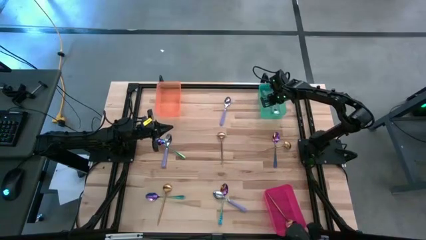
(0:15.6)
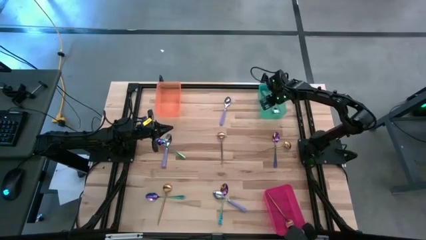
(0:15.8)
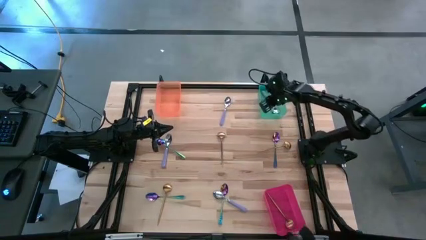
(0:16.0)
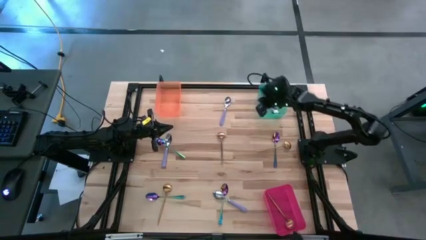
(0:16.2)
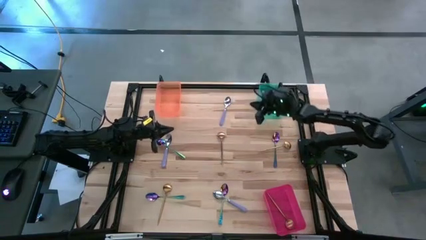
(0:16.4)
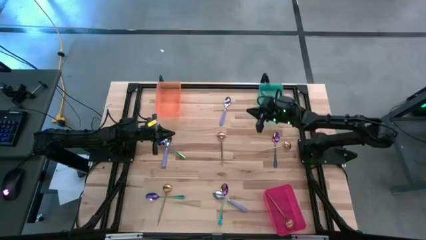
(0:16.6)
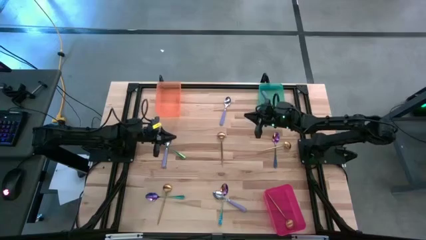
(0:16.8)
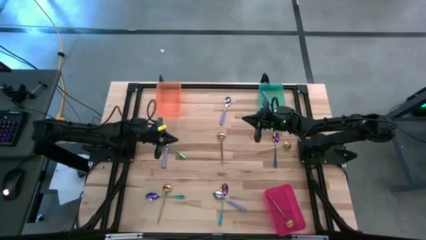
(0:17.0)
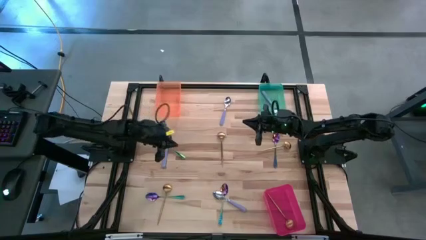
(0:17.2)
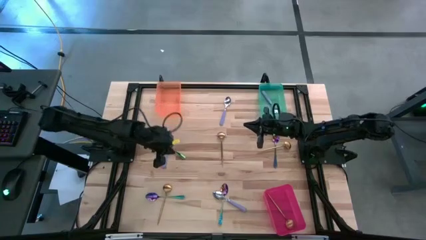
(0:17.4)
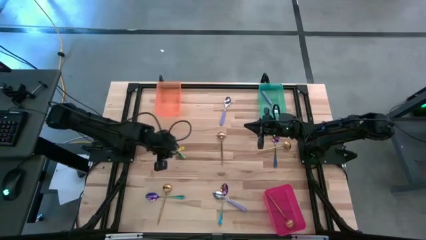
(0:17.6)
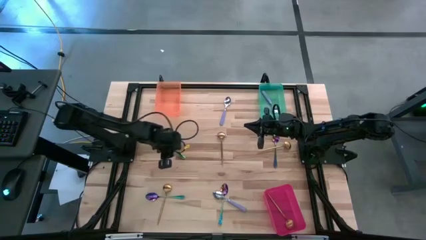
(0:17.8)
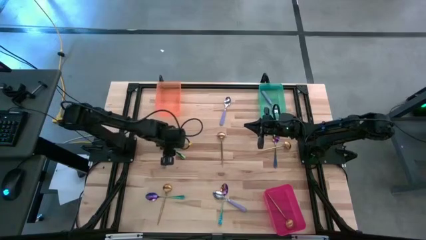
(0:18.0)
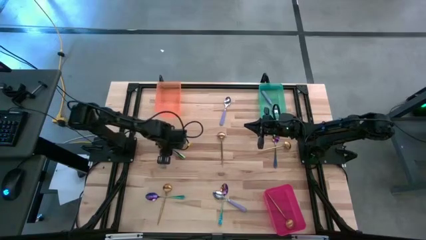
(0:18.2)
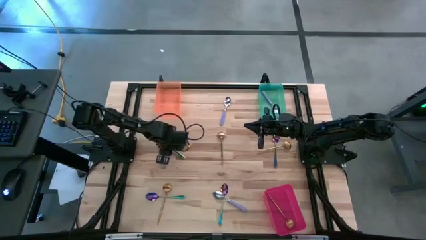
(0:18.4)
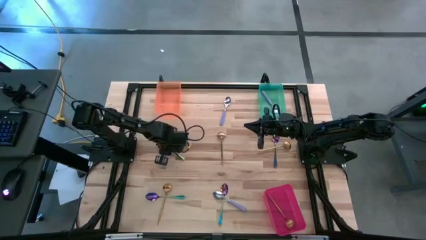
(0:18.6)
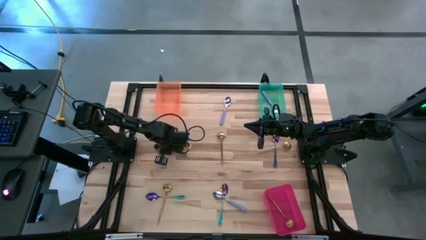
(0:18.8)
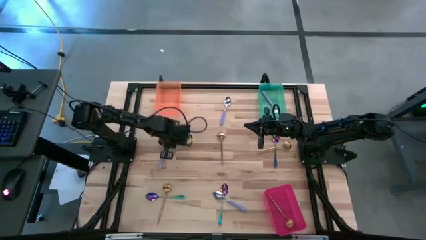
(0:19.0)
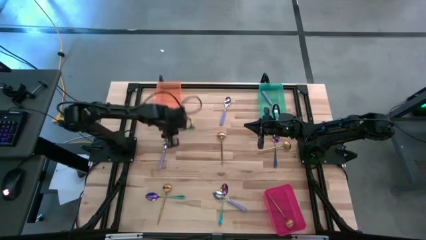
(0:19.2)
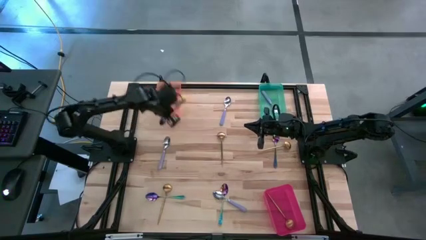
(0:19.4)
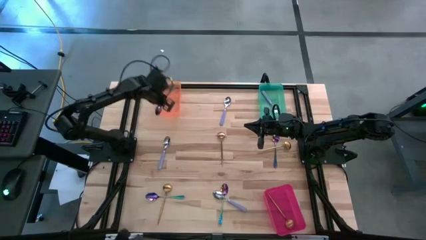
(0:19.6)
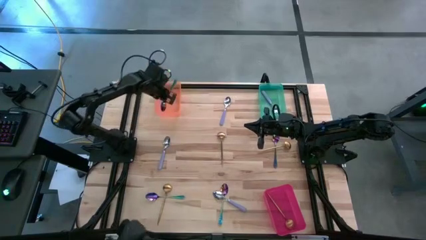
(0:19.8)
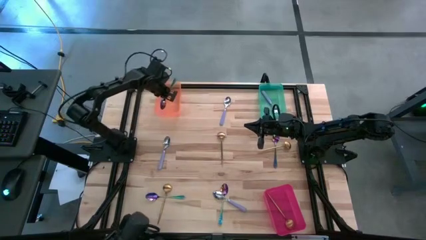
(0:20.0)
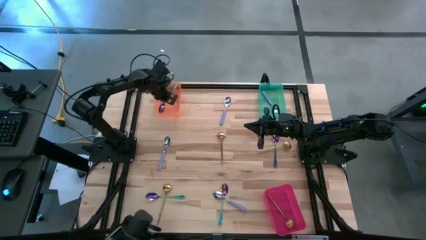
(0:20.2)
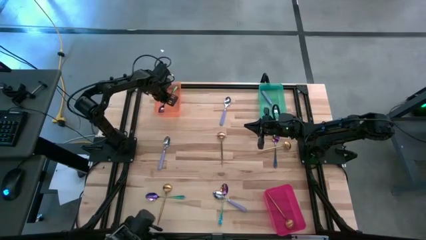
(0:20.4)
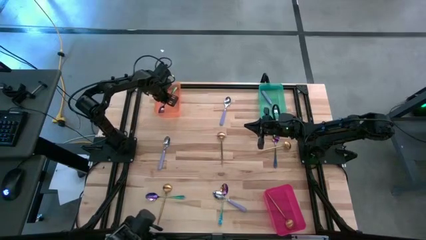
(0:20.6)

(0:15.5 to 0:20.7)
Task: Sort silverware by color (type)
Put the blue spoon into the orange bin

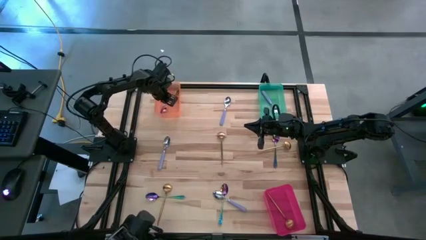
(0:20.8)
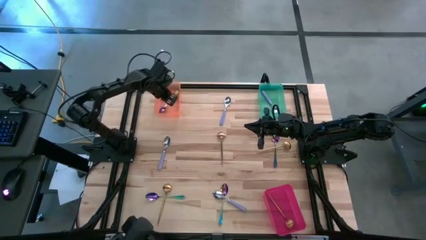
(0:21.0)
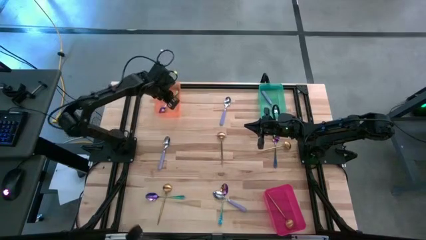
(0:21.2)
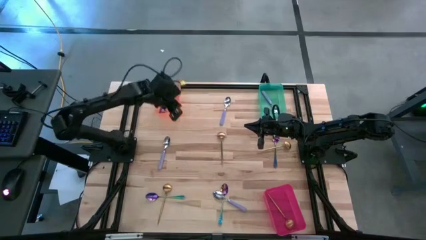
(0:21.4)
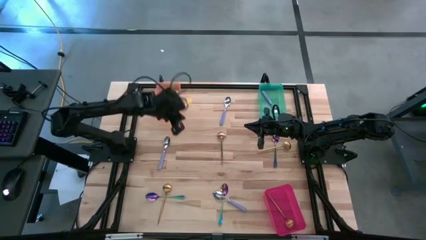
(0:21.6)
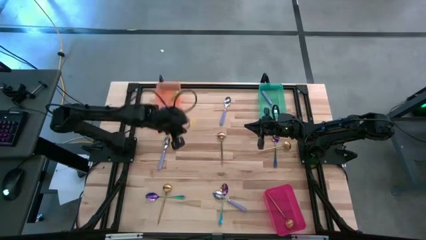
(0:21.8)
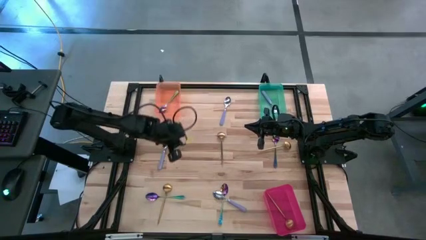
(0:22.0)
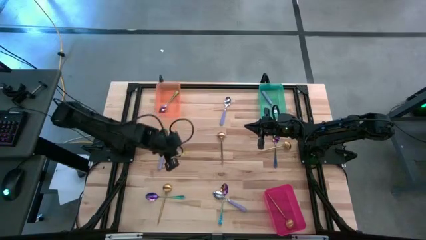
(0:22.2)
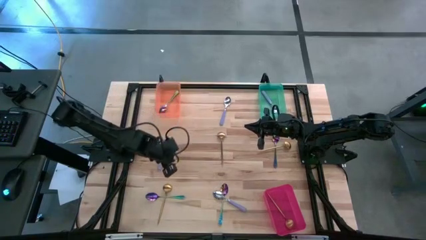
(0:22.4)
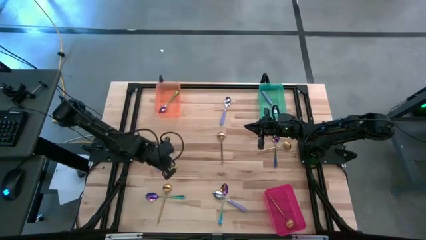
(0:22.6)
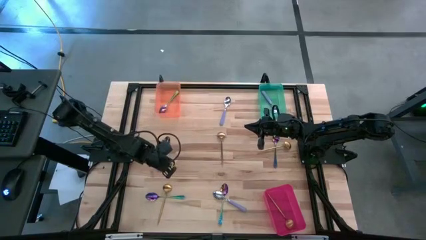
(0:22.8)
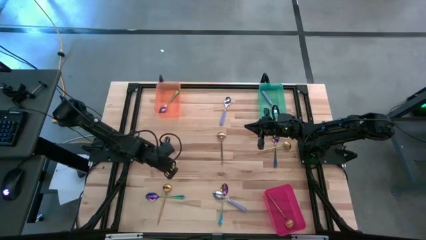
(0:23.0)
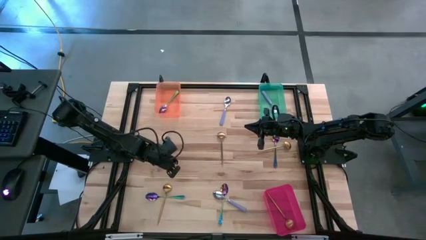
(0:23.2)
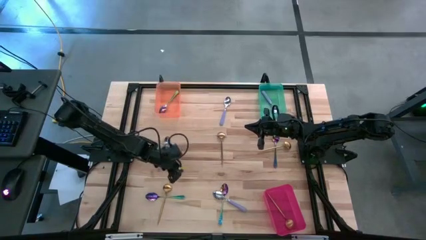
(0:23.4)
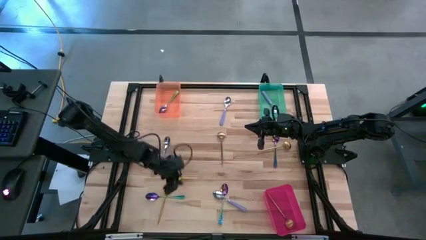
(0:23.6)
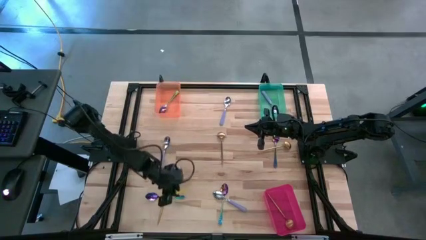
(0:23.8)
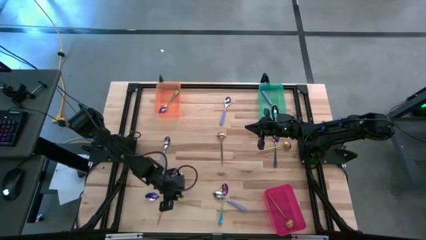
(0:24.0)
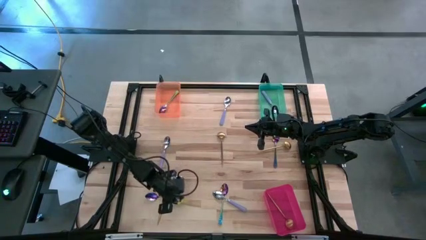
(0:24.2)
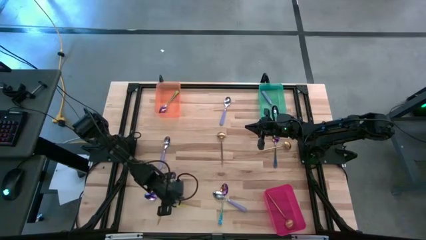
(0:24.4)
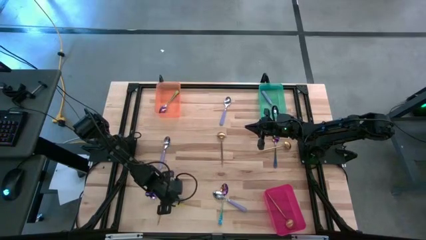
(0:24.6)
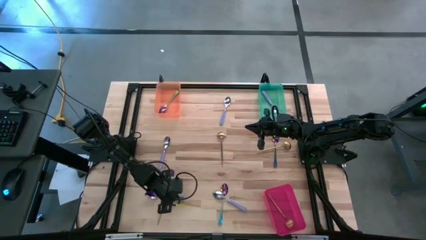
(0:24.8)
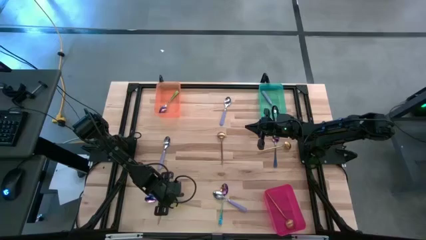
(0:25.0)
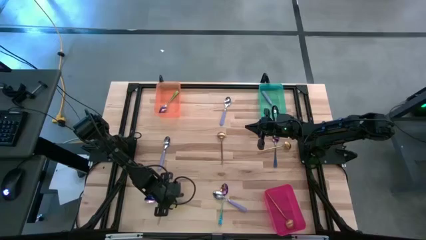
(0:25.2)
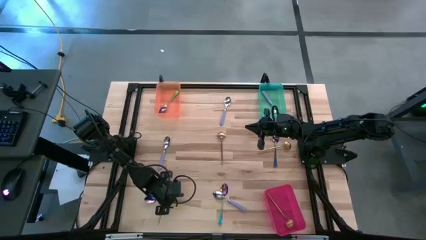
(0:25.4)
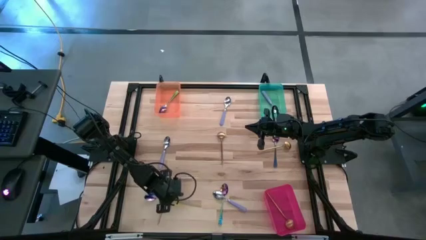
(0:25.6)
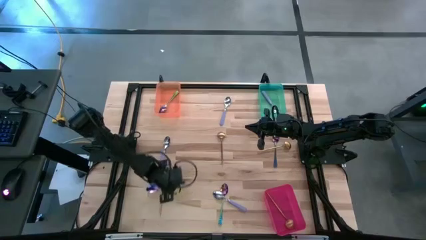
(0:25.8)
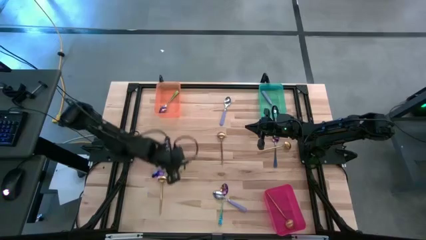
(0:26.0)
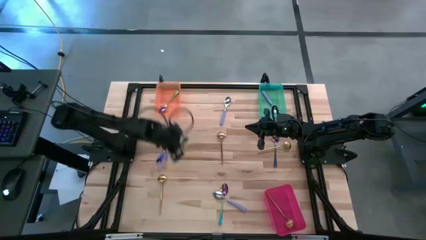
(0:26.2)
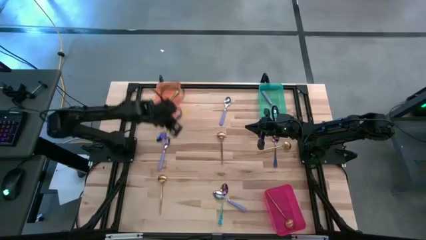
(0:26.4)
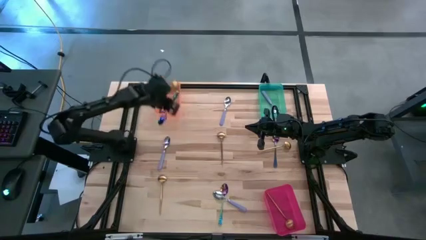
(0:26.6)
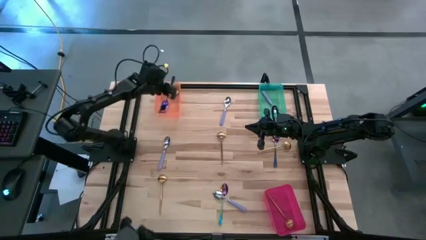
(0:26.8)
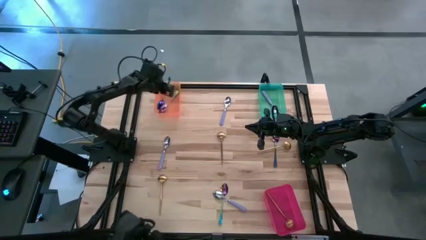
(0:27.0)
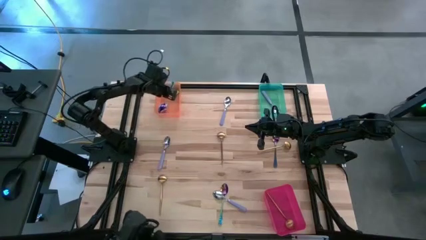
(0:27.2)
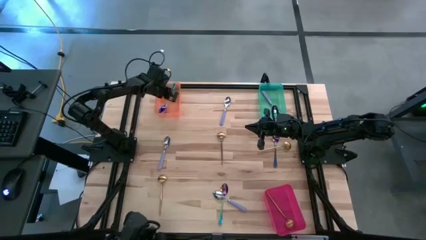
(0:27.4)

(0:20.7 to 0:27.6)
Put the blue spoon into the orange bin

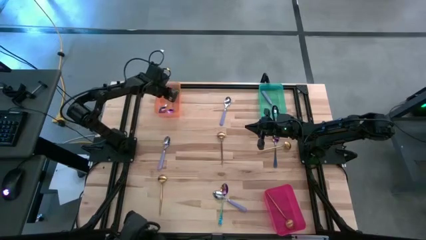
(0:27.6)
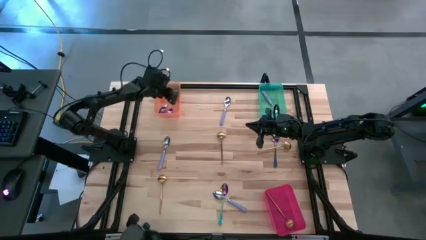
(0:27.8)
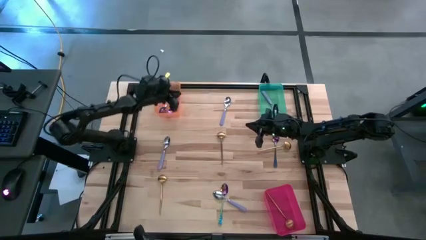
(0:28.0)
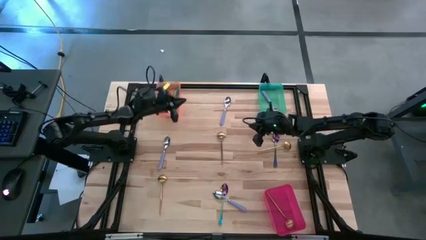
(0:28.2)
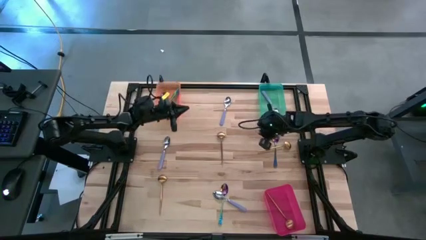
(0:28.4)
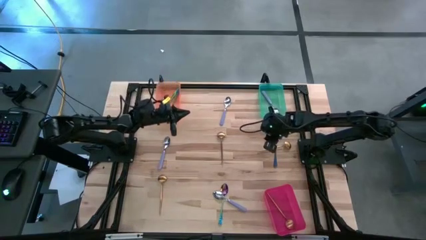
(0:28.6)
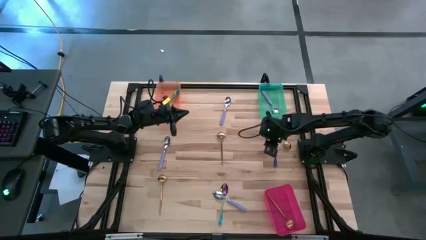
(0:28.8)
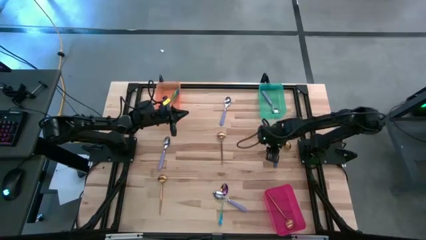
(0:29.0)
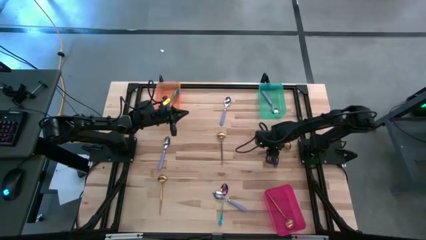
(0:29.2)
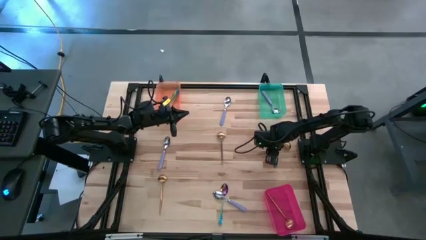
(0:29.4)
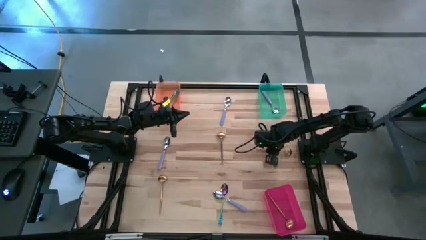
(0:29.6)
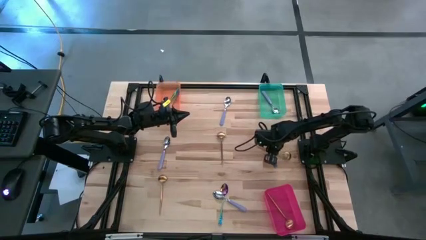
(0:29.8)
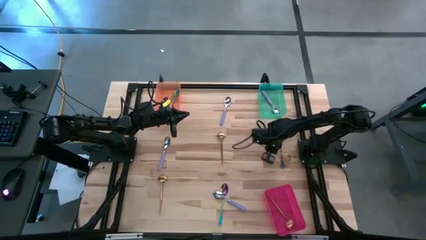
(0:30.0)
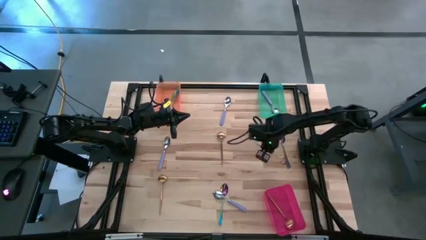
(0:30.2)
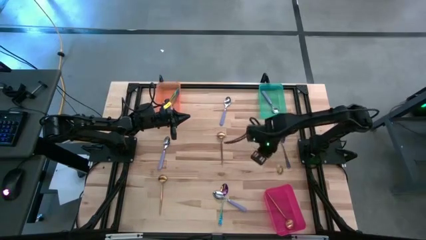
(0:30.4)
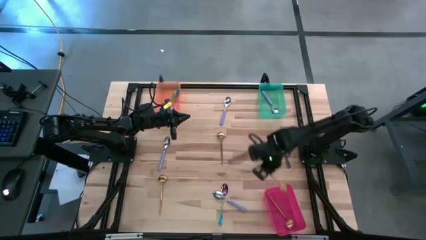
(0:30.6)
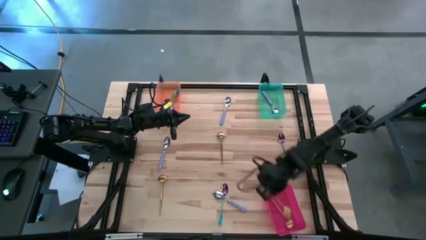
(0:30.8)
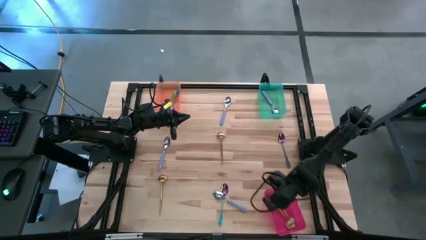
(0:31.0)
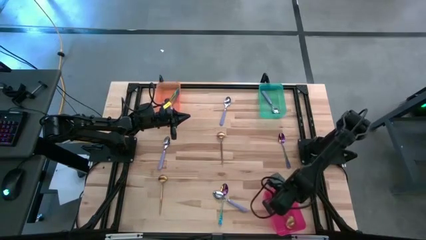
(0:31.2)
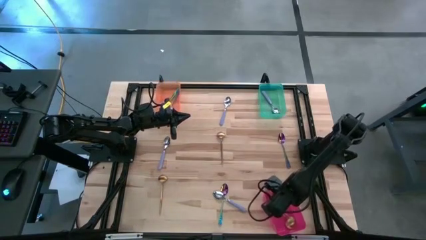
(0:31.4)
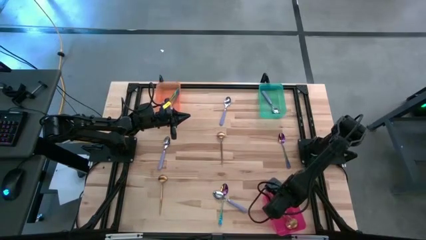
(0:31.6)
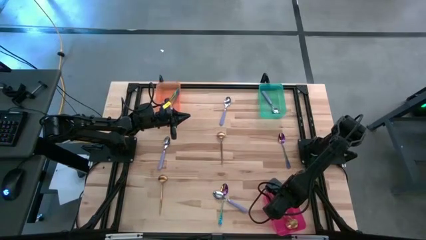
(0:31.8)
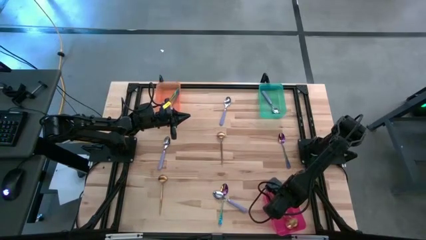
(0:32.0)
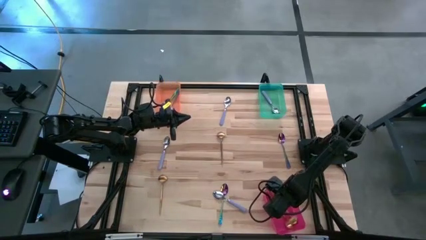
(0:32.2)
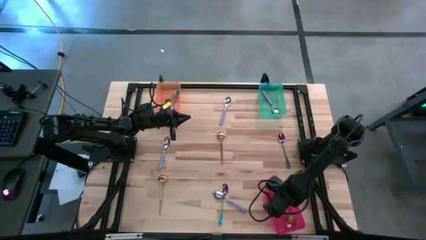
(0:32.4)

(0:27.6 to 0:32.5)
Put the gold spoon into the pink bin

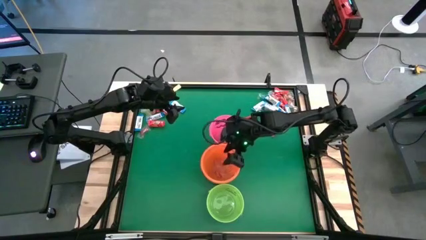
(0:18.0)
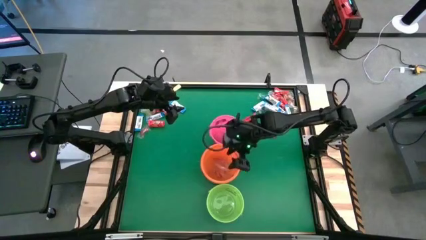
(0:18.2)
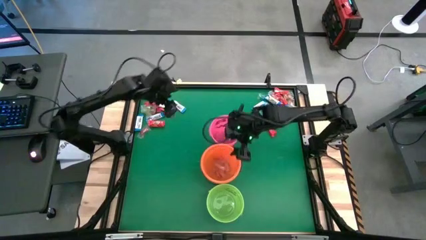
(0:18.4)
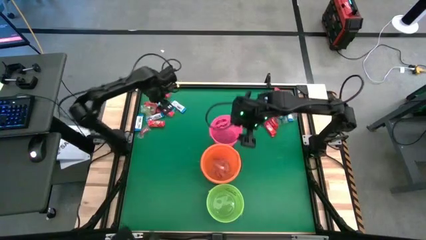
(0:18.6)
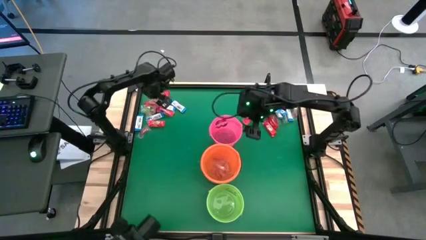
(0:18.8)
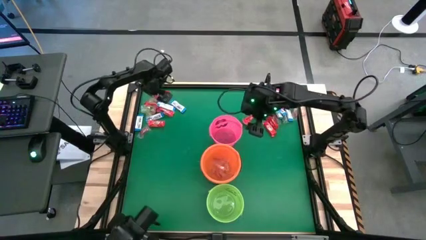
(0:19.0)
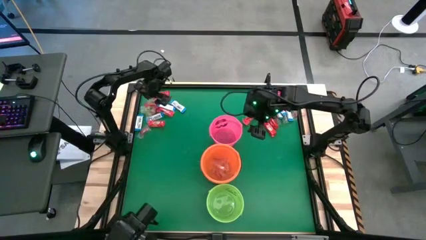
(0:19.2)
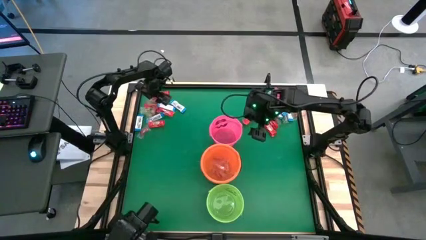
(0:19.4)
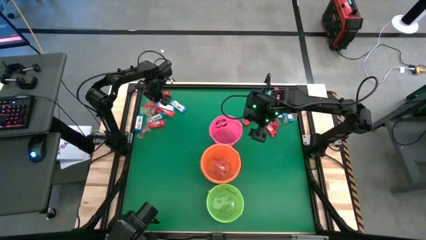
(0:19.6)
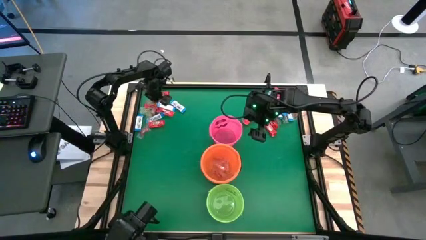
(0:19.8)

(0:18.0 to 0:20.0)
Task: Sort candy by brand, put in halloween buckets
Put the green gummy into the orange bucket
